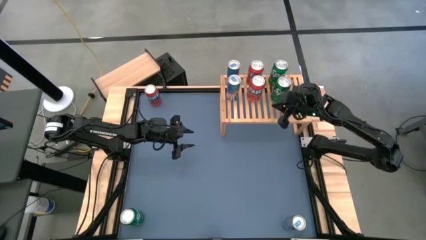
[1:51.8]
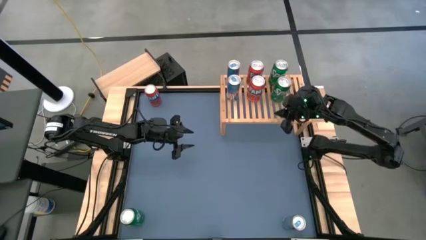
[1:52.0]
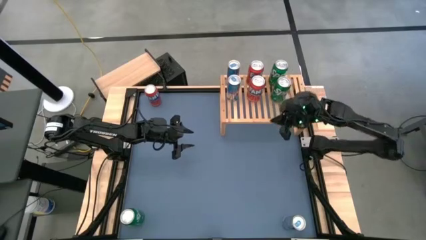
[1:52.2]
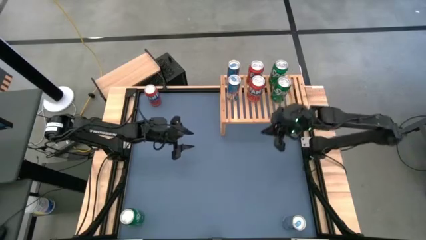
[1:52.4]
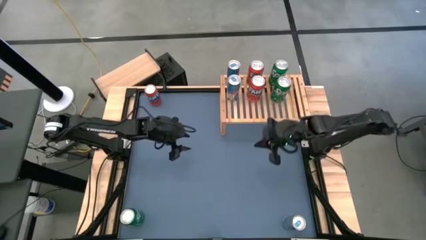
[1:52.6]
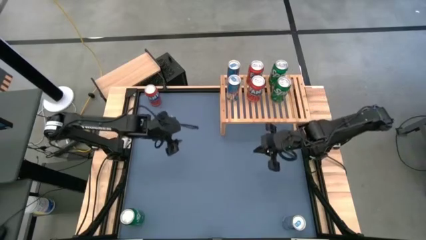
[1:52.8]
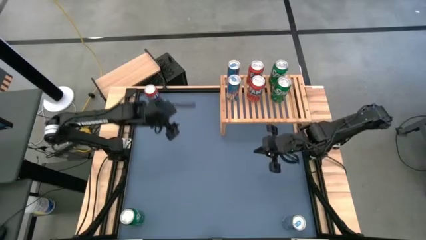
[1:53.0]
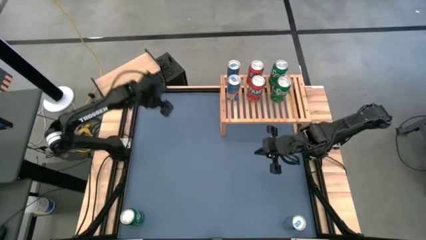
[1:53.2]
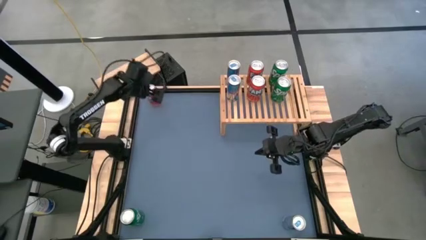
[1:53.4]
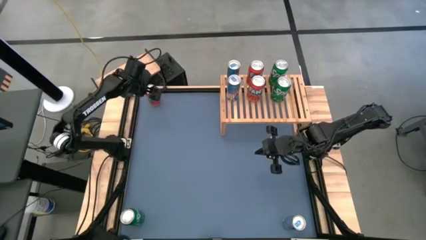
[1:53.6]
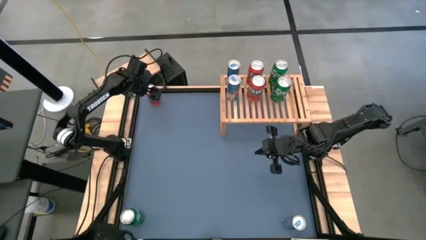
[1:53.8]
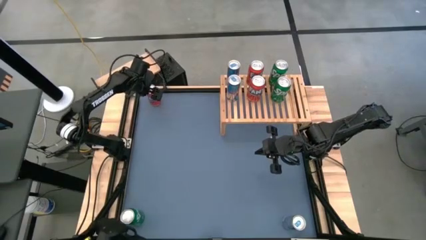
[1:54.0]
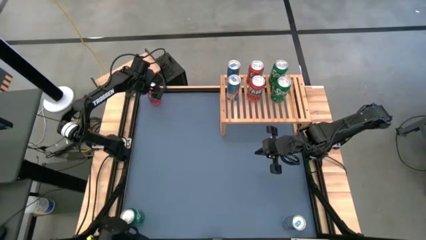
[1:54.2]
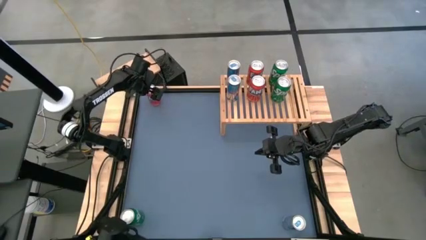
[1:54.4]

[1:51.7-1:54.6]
Task: Place canned beverage on shelf
Put the red soda can on the shelf aligned with the other red soda can

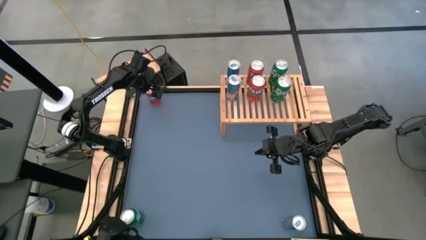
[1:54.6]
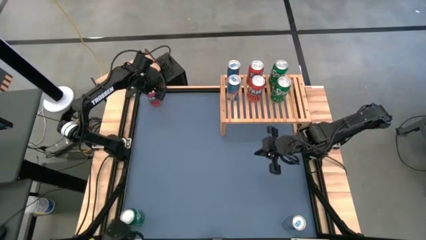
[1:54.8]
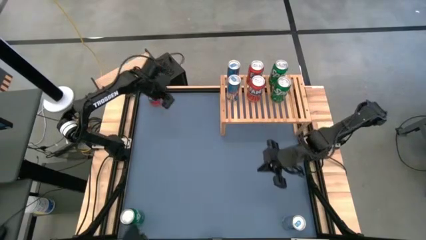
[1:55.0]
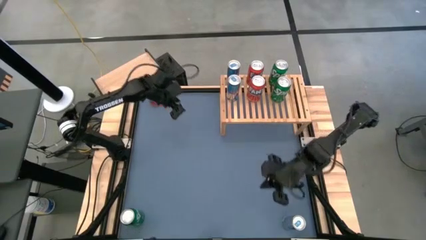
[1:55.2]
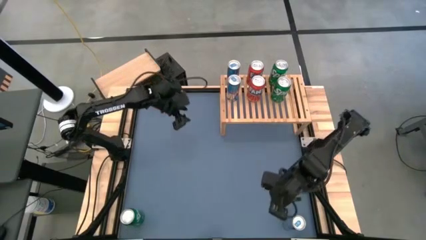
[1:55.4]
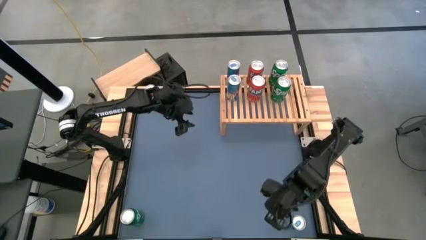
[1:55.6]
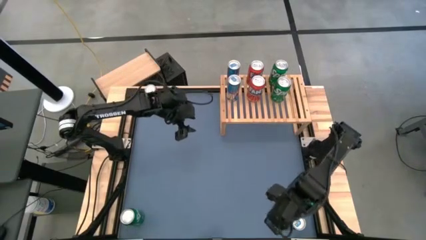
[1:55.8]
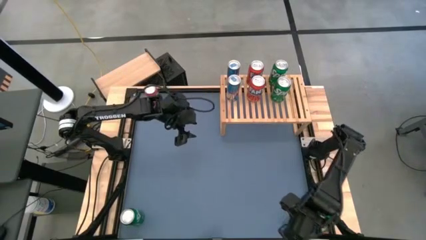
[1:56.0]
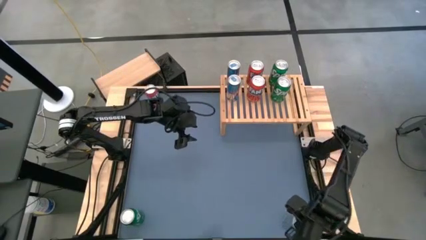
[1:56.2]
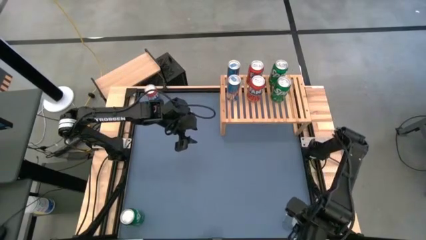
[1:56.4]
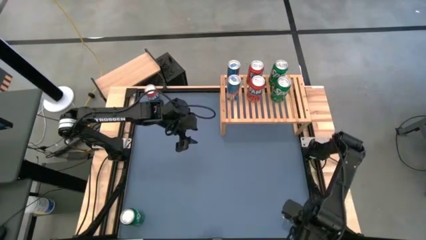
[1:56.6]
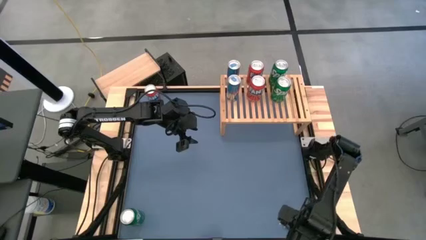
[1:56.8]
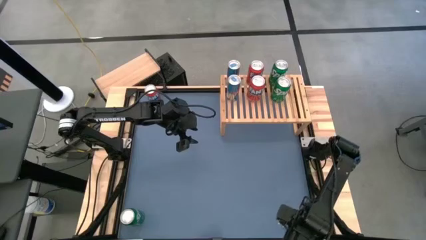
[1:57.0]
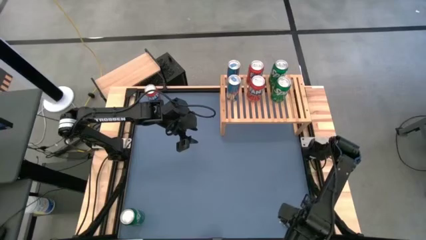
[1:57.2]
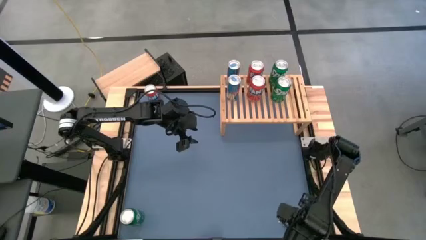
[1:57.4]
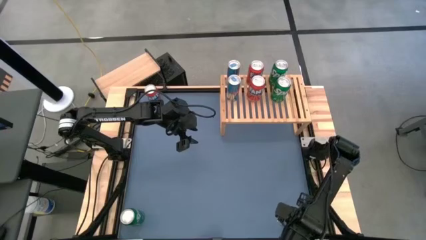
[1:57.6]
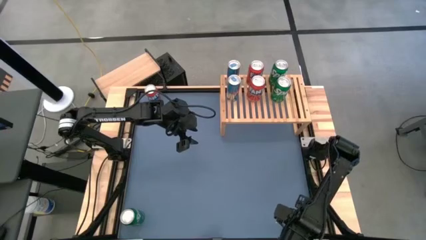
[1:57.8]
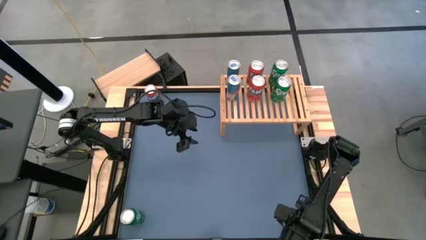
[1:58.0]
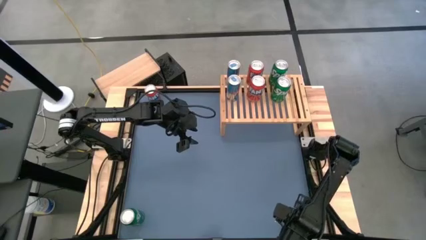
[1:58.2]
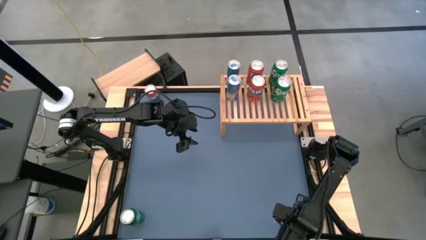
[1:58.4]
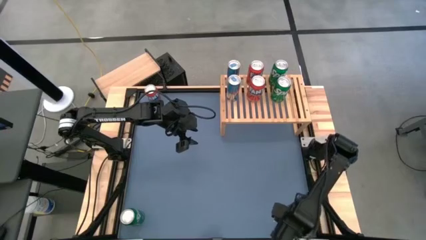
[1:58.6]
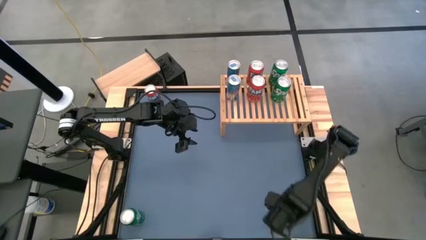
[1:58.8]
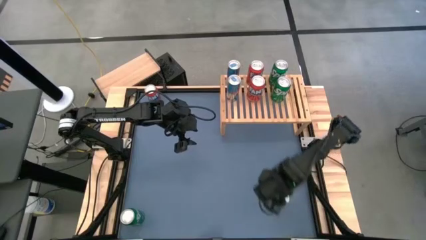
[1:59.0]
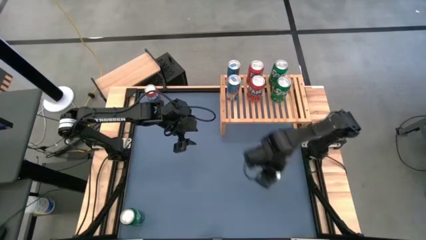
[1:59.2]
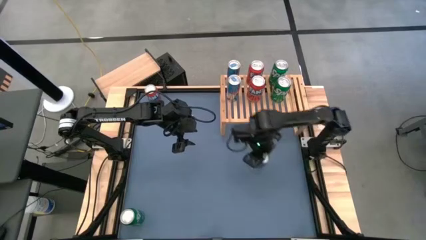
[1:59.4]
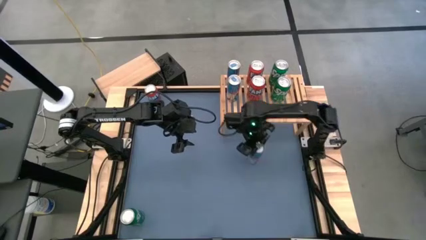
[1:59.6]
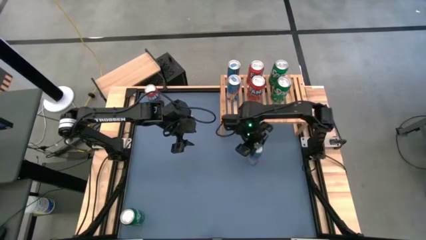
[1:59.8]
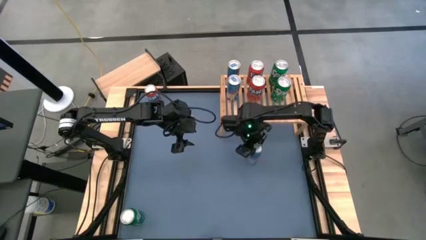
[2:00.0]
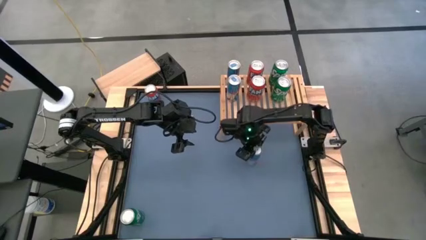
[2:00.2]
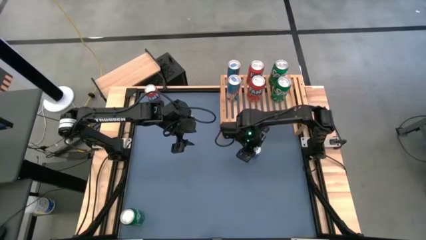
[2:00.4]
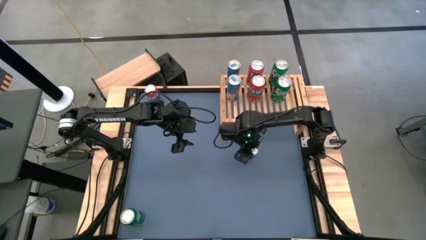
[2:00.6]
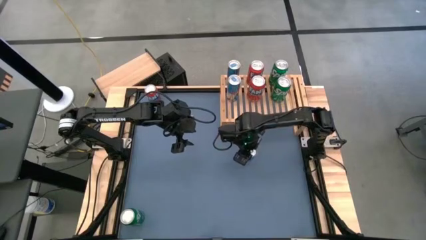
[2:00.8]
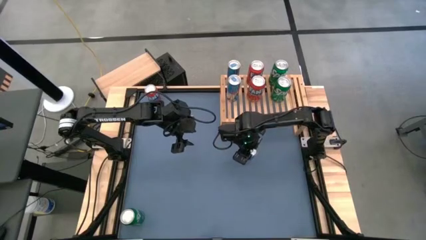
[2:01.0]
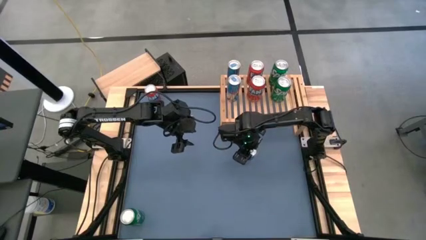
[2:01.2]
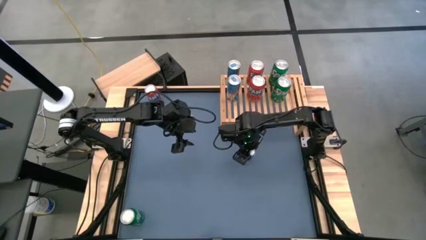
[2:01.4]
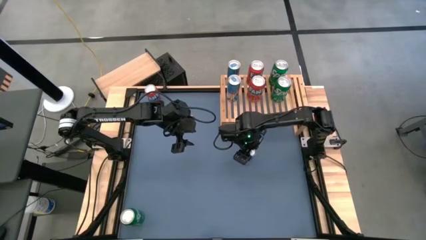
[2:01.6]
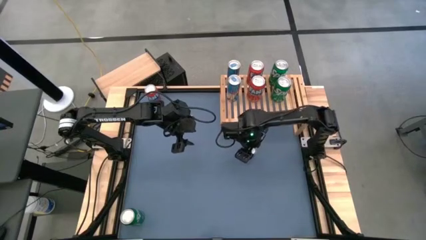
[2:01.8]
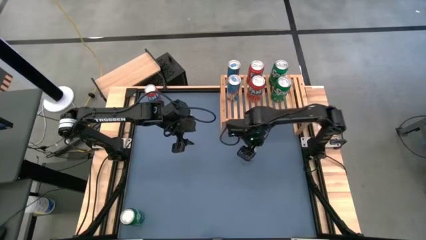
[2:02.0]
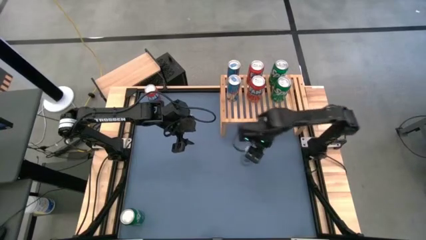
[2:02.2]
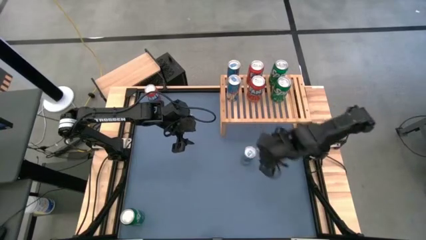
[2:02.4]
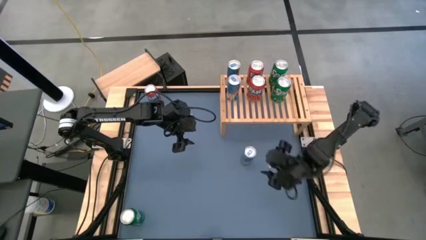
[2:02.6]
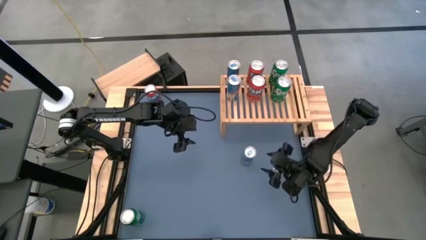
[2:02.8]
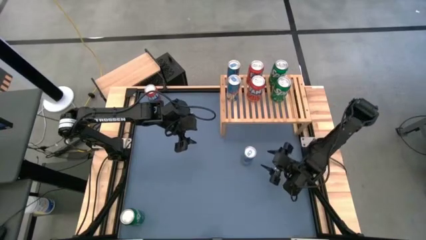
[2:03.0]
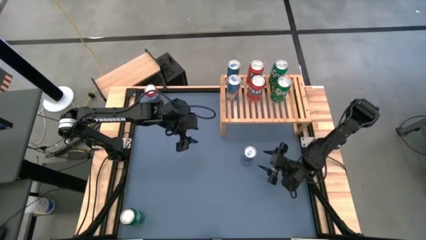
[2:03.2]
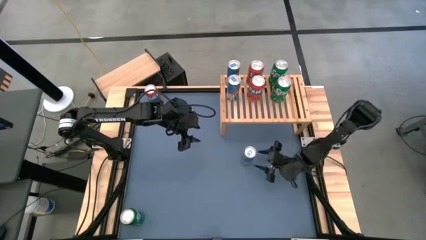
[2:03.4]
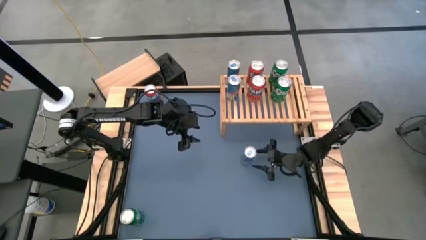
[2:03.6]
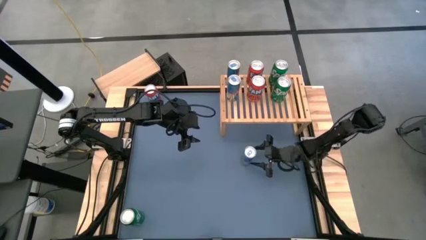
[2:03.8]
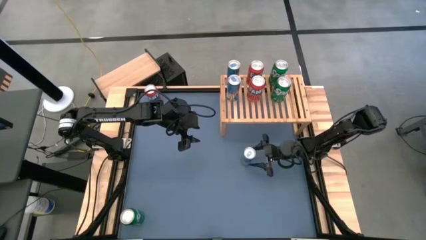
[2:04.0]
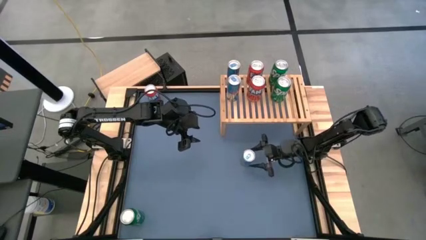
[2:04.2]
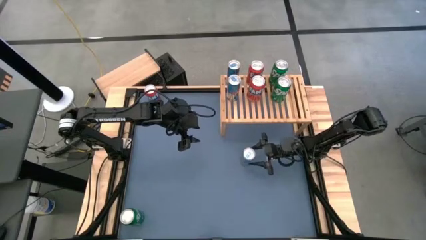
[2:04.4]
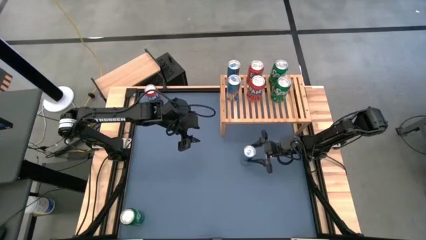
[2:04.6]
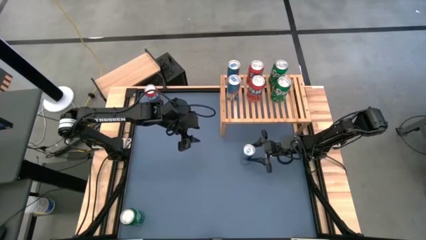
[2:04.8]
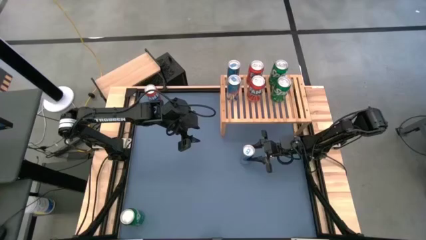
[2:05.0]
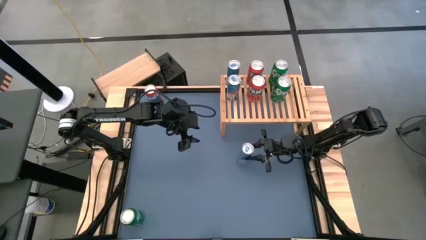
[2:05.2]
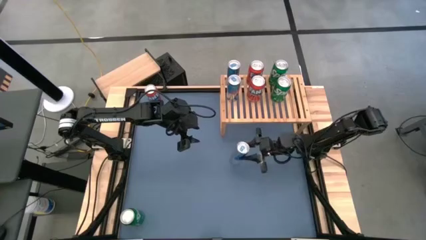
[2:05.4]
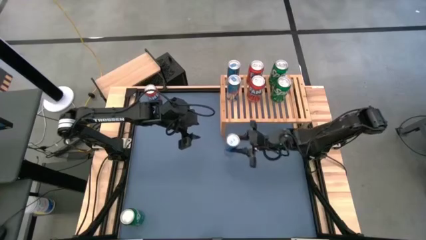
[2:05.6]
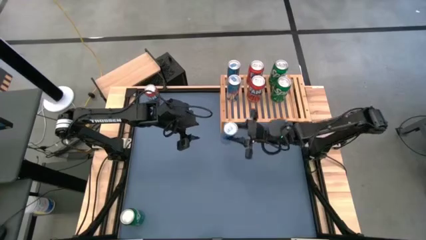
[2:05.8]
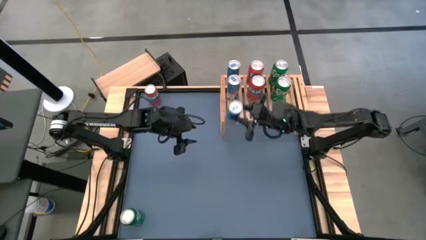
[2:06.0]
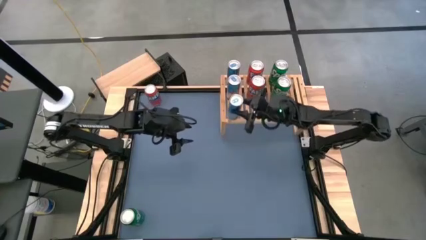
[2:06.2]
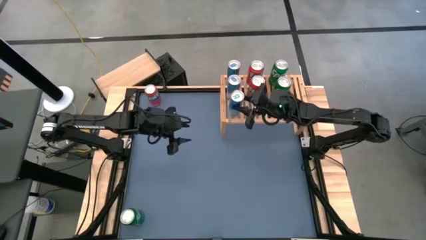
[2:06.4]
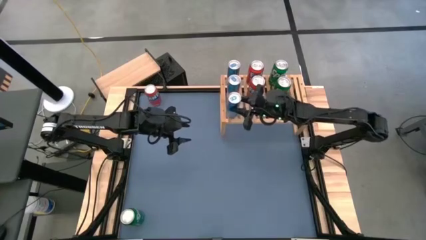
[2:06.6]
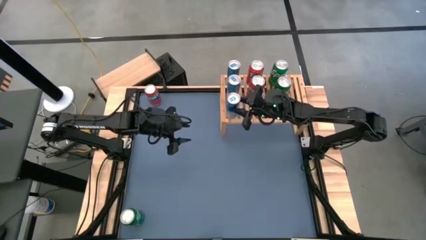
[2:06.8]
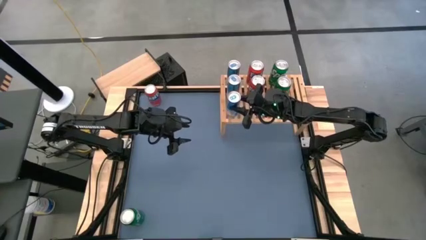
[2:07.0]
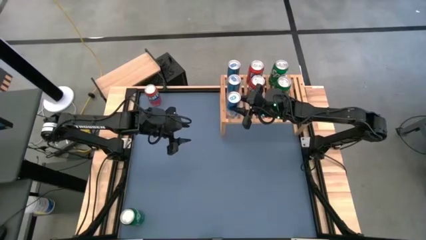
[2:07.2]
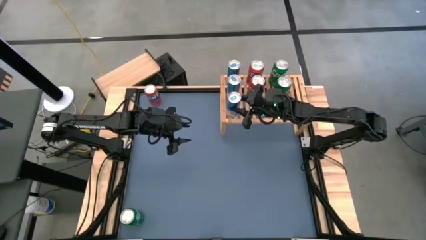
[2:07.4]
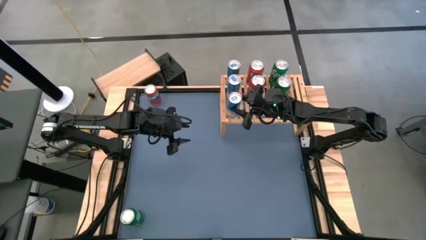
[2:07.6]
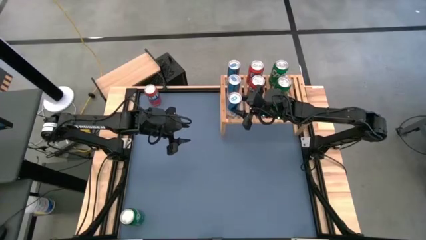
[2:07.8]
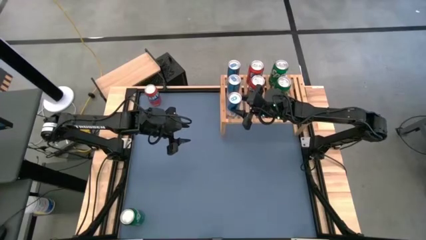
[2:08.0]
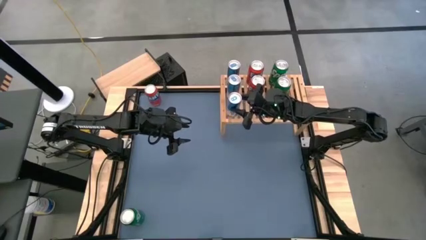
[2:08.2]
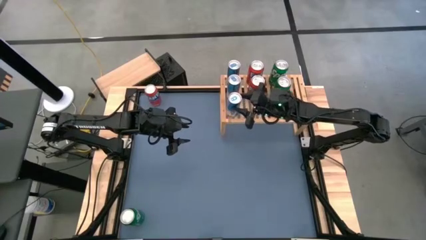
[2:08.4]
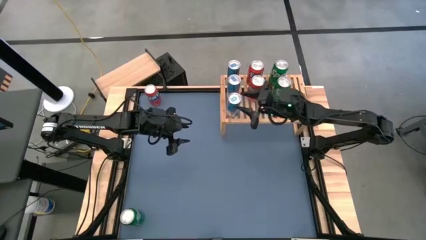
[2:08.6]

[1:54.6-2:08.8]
Put the blue soda can on the shelf aligned with the other blue soda can
